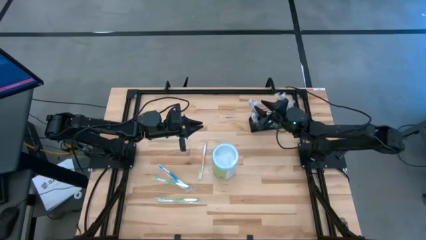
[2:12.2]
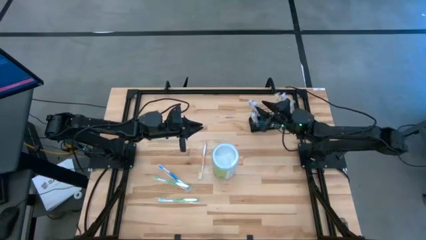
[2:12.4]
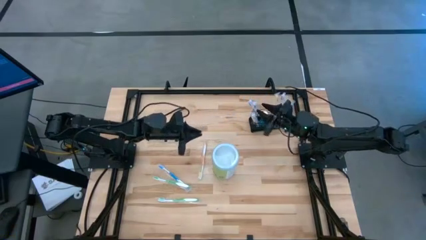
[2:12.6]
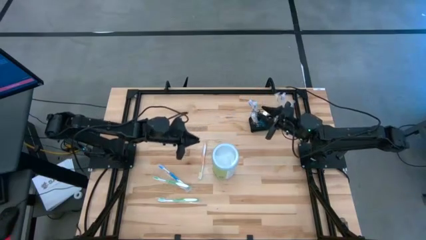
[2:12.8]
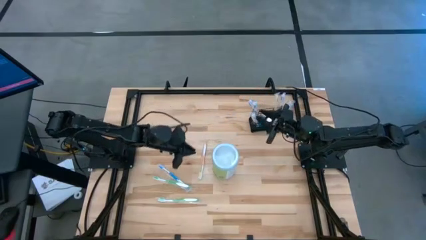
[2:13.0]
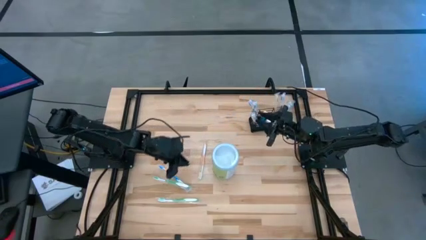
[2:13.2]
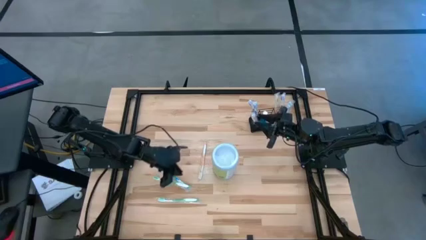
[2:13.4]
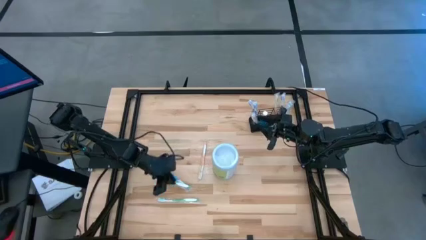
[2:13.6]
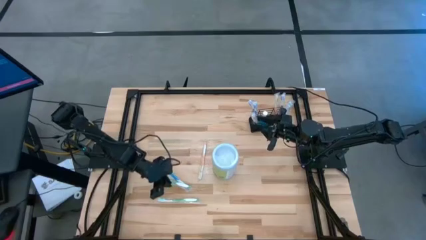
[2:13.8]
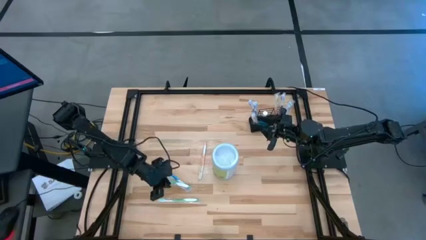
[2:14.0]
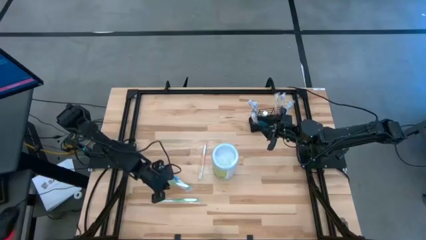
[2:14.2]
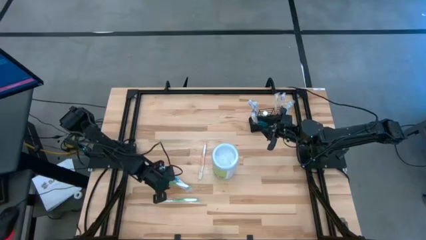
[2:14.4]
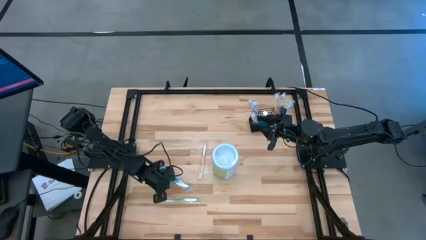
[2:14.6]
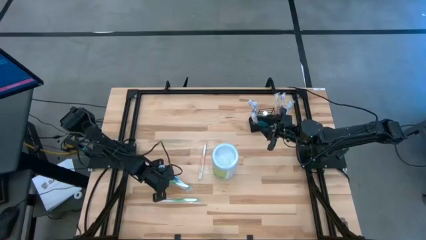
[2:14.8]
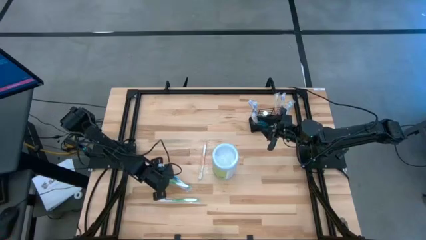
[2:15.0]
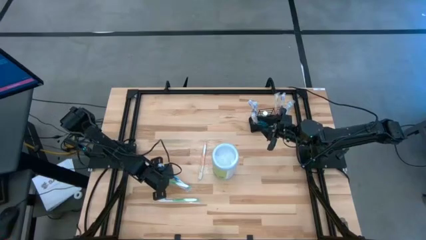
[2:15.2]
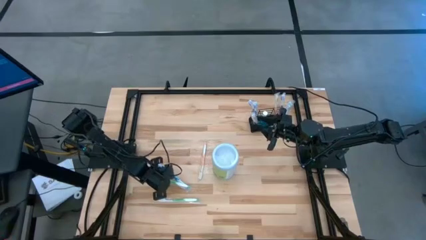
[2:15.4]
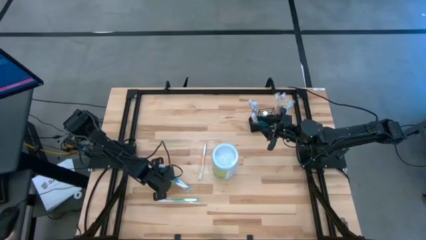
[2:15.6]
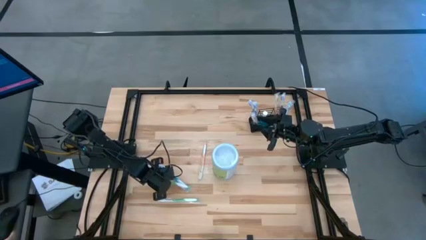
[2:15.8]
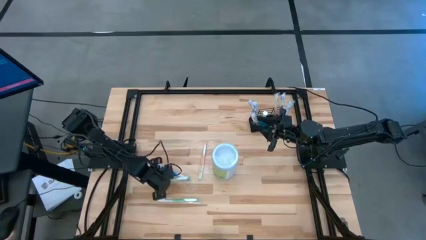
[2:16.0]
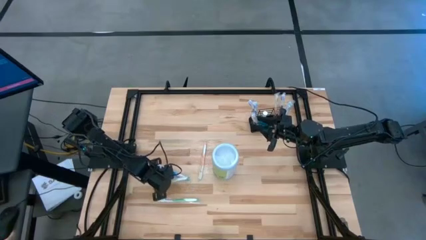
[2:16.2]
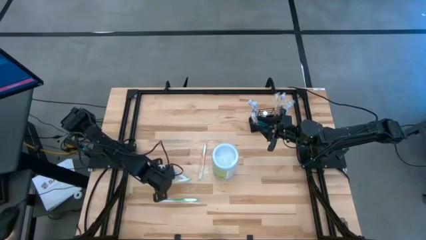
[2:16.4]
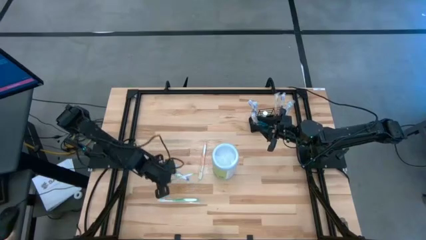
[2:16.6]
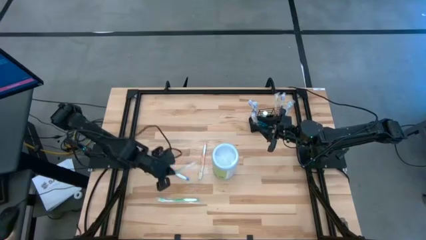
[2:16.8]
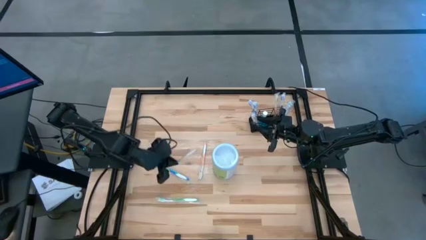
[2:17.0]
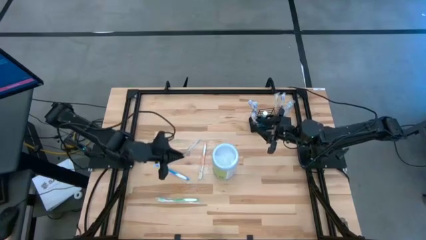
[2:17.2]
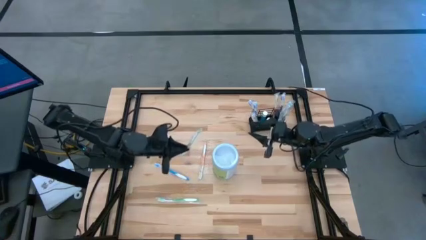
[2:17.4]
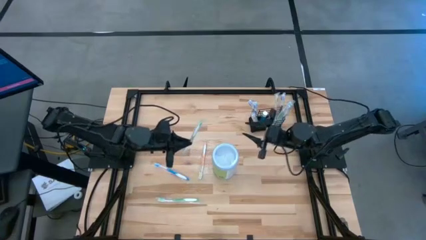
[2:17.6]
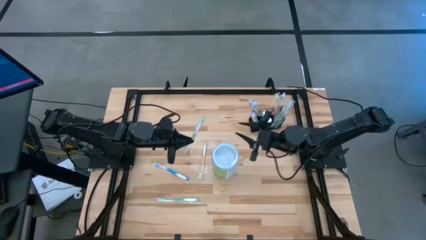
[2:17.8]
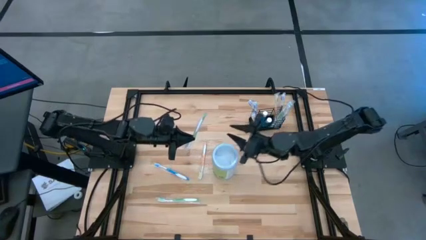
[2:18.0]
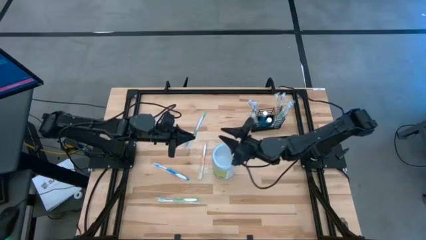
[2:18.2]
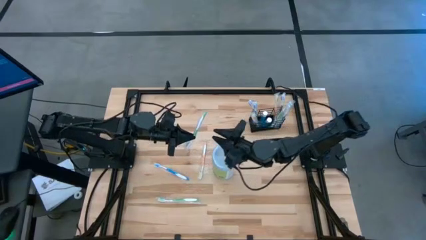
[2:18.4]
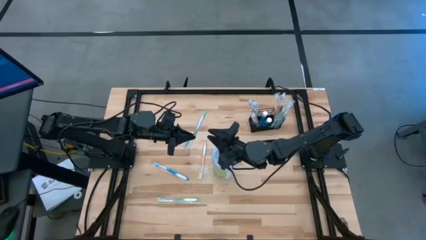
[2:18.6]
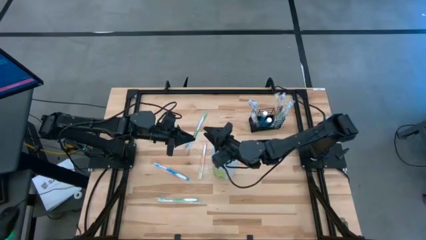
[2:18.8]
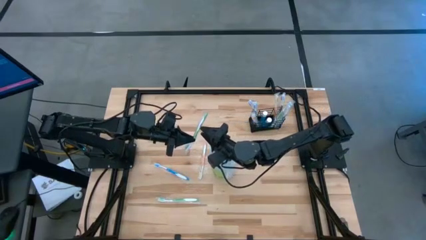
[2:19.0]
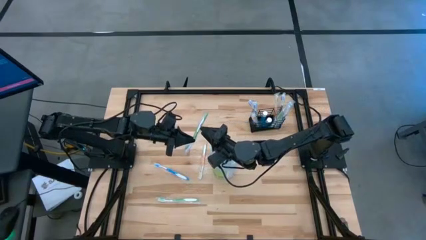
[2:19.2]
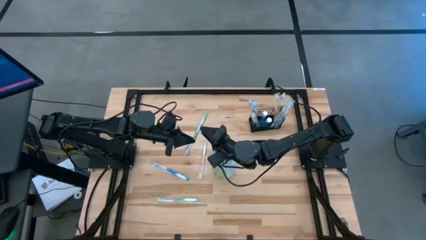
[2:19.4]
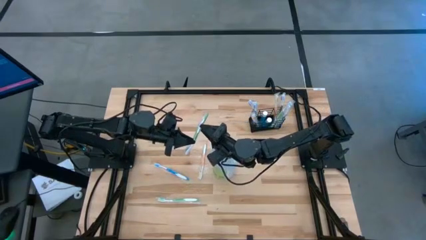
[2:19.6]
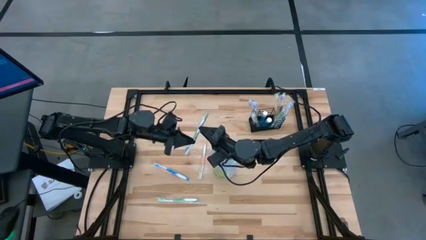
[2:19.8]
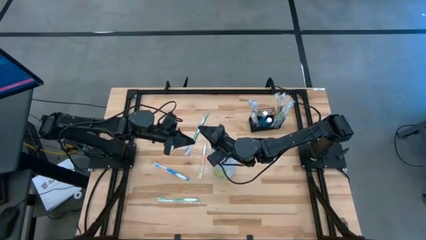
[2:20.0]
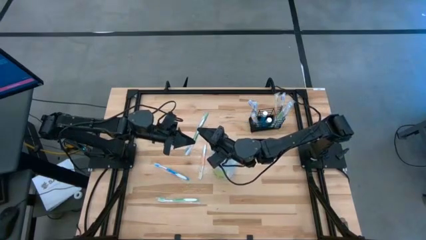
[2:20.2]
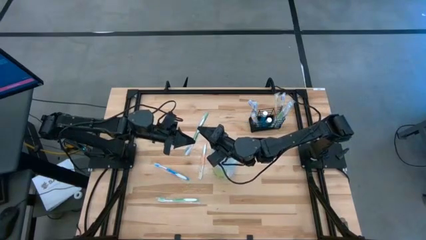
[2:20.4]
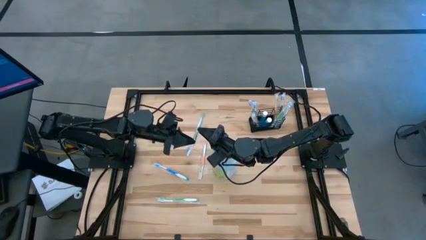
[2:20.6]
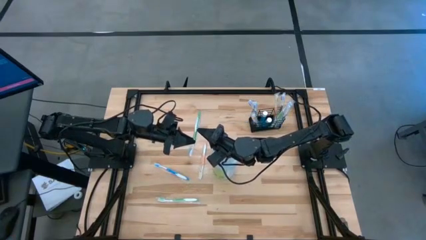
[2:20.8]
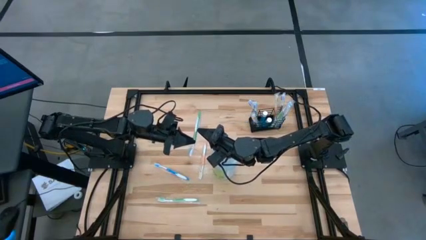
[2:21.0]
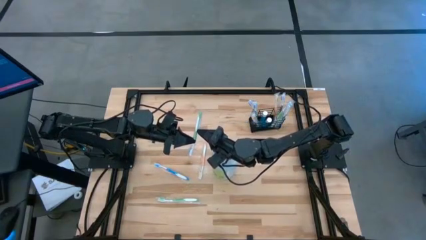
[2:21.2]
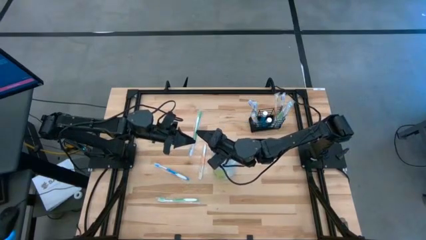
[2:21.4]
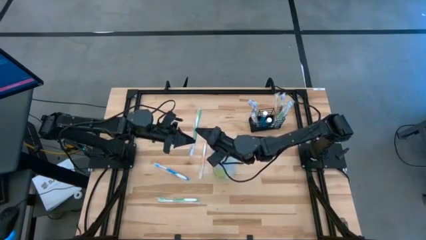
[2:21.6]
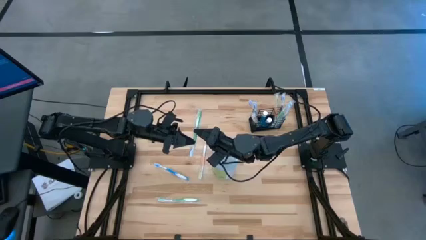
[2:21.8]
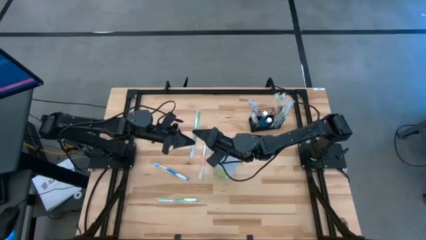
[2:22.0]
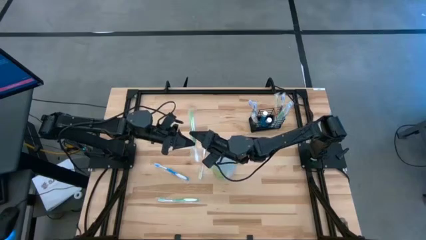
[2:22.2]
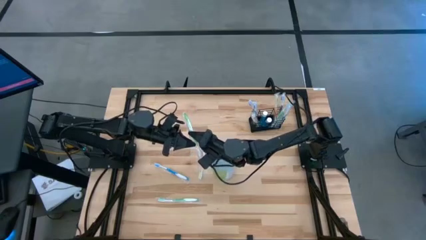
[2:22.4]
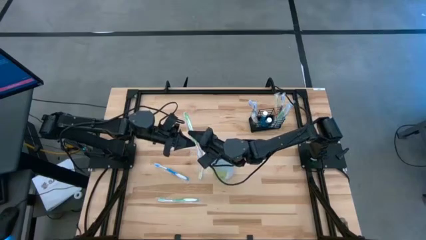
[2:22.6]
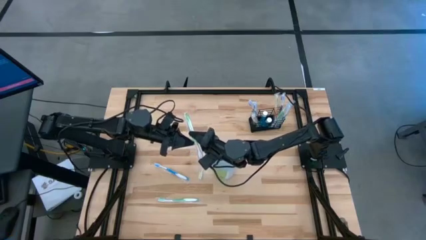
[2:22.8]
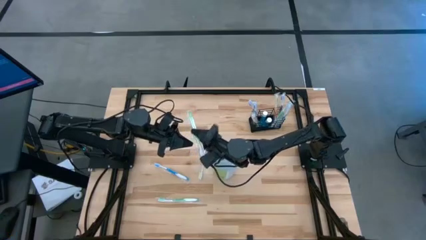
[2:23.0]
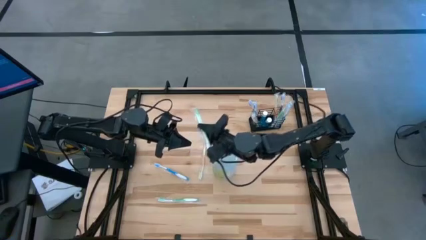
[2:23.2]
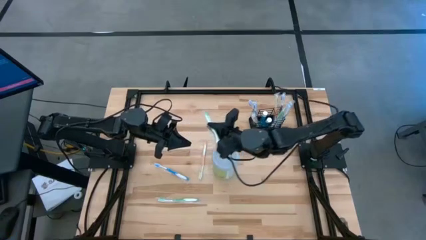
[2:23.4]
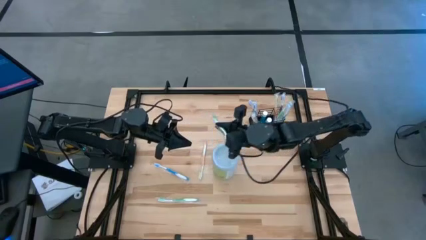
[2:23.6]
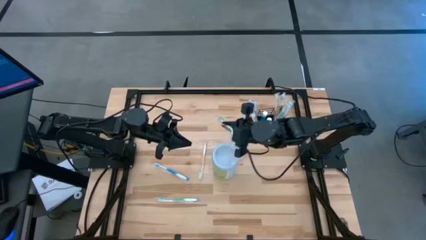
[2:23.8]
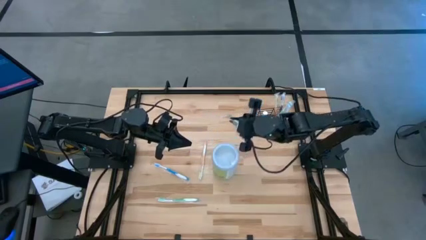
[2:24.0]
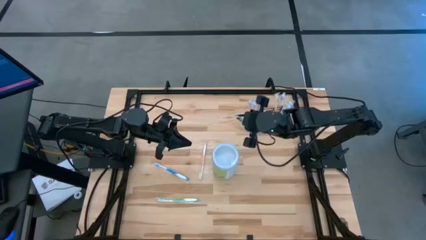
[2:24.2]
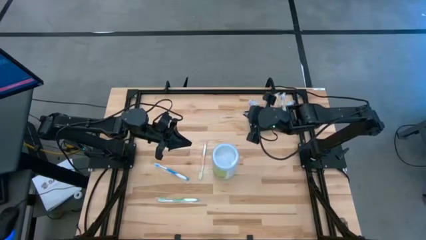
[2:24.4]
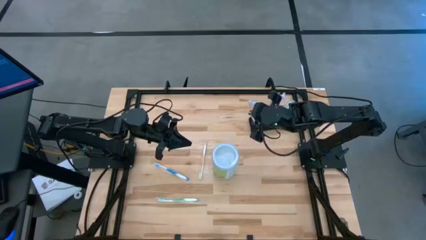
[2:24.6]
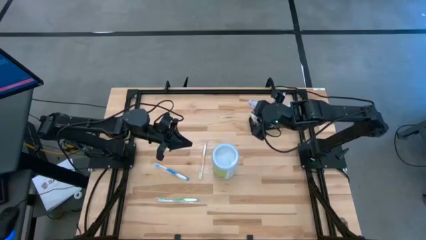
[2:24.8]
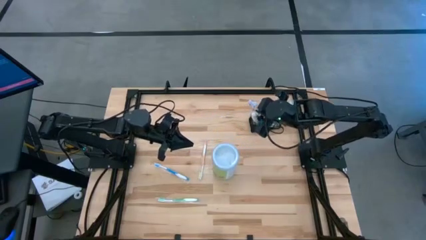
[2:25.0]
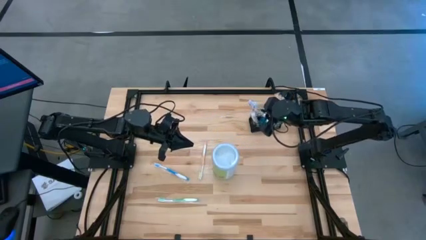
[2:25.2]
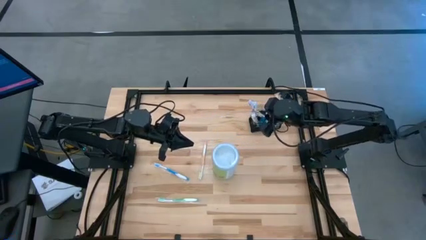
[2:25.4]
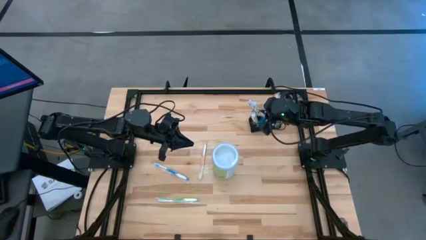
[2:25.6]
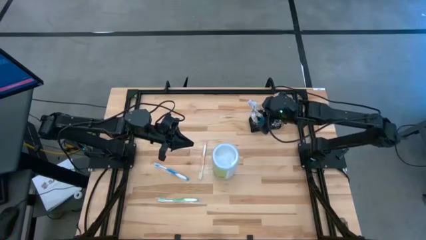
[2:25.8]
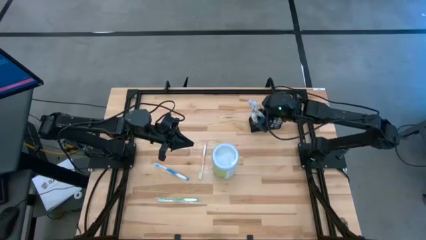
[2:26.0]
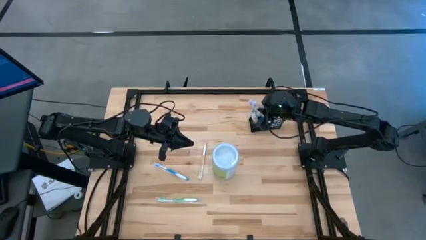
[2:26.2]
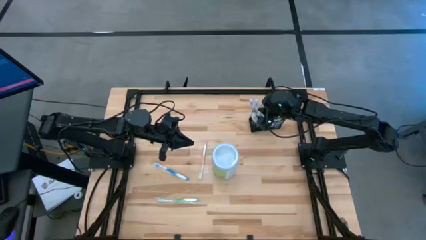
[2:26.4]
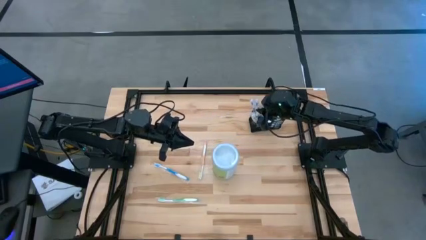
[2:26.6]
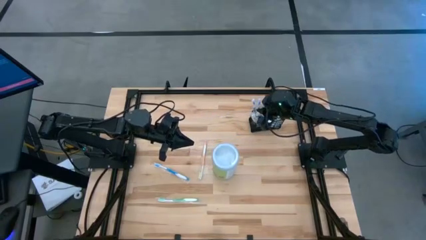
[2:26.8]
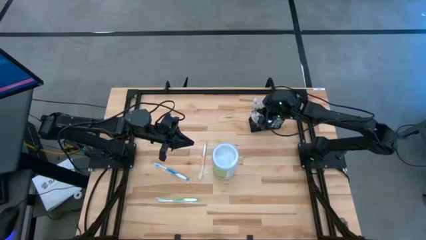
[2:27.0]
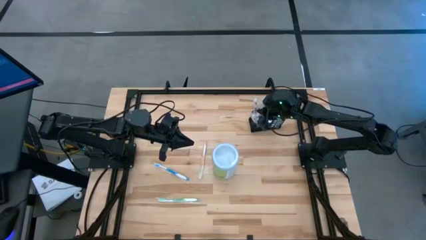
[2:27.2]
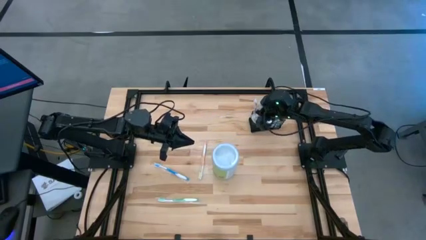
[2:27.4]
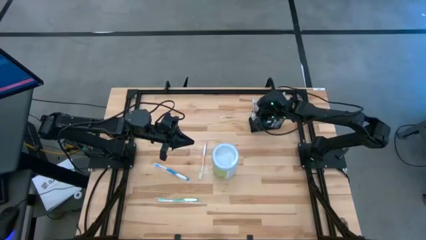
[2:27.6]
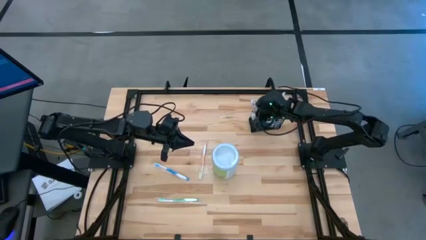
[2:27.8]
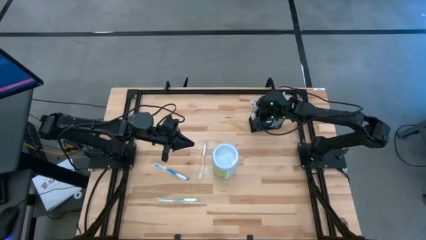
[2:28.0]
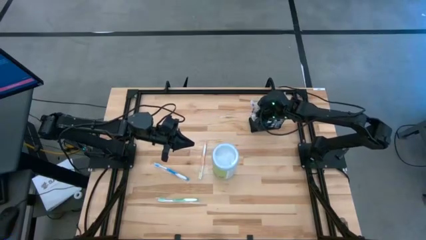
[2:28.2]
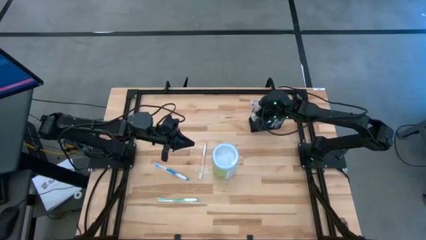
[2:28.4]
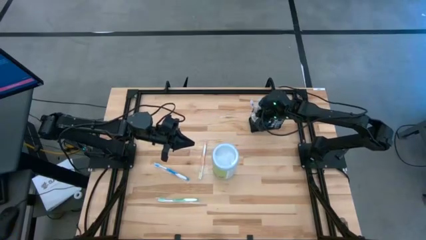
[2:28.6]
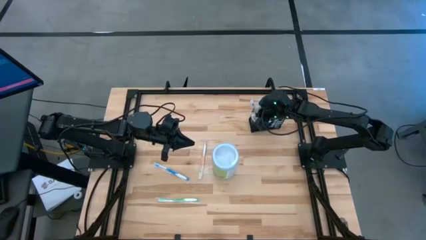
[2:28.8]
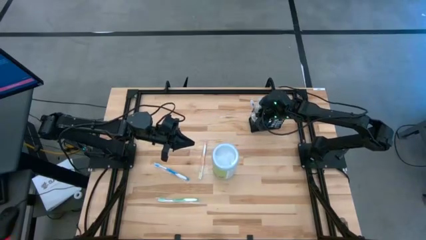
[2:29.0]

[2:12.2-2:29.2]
Task: Pick & Place toothbrushing station
Put the green toothbrush into the wire organizer
